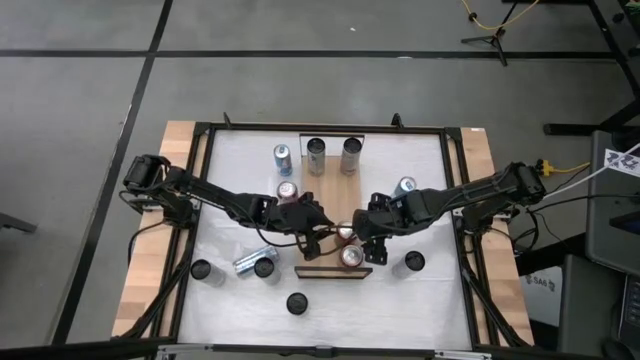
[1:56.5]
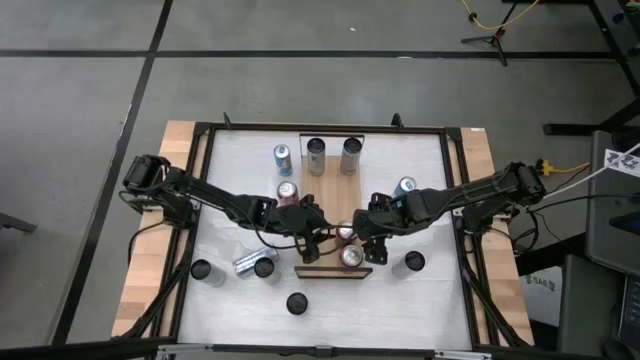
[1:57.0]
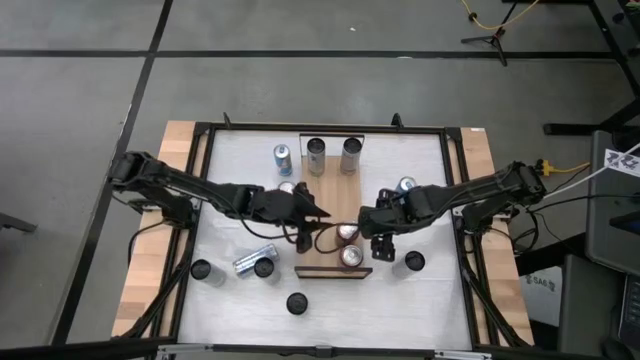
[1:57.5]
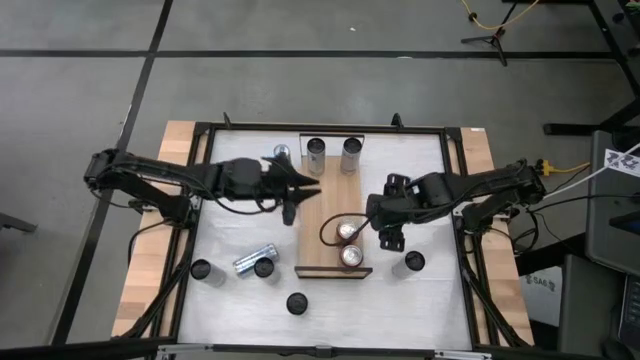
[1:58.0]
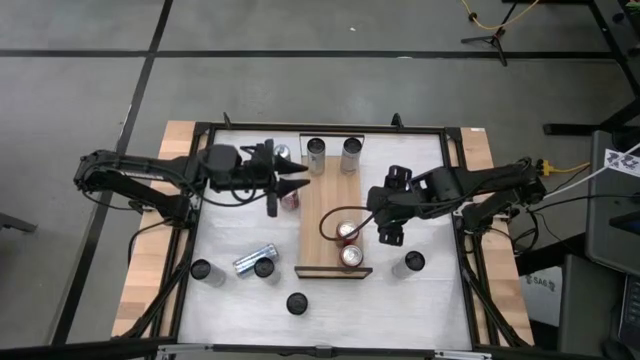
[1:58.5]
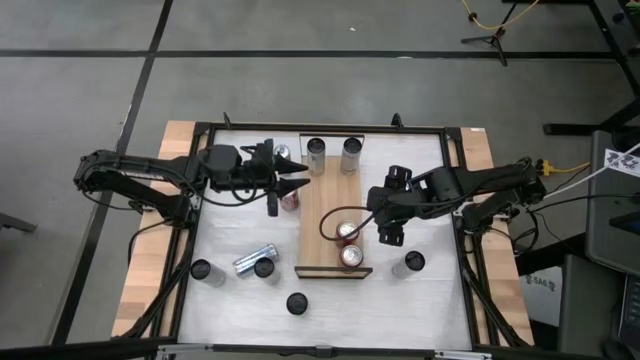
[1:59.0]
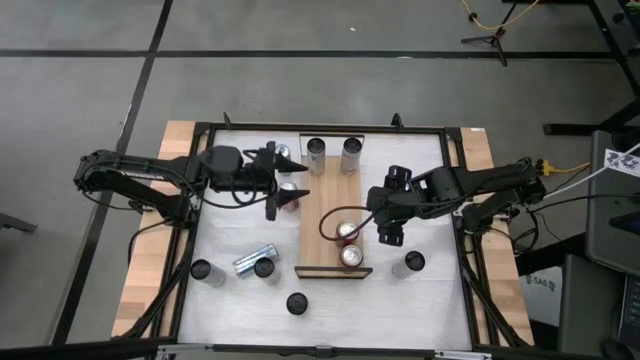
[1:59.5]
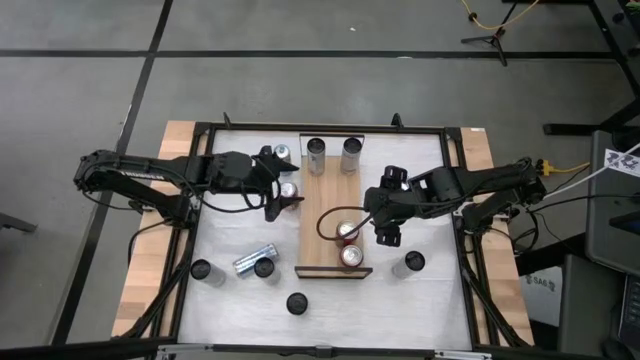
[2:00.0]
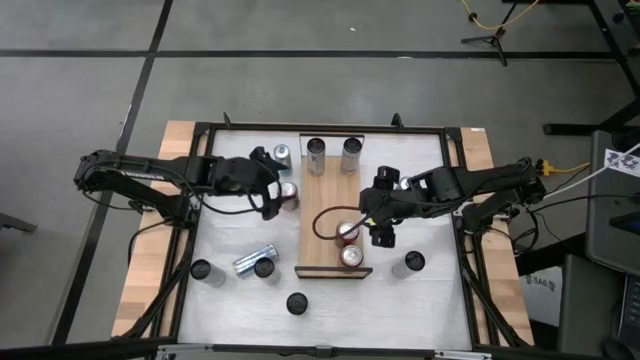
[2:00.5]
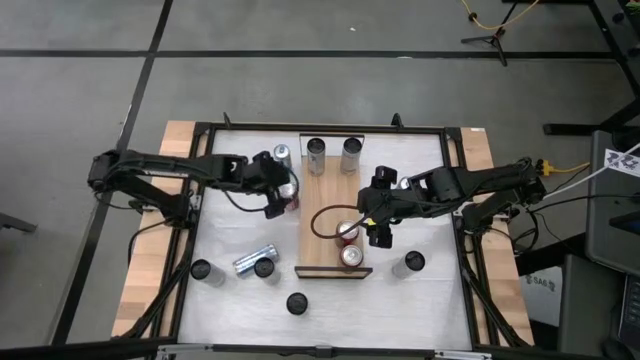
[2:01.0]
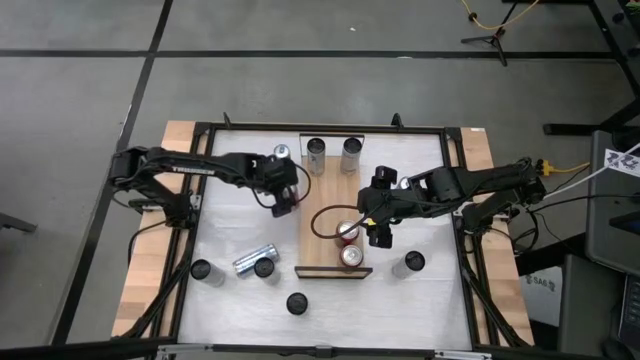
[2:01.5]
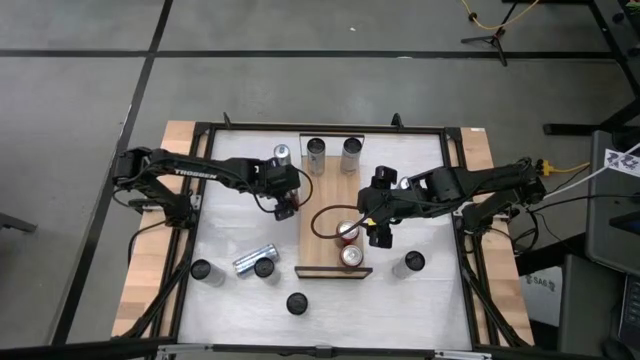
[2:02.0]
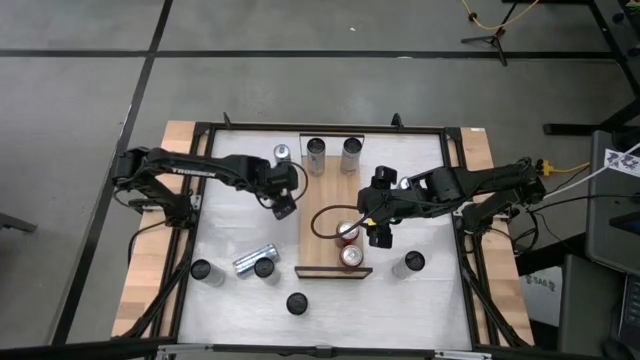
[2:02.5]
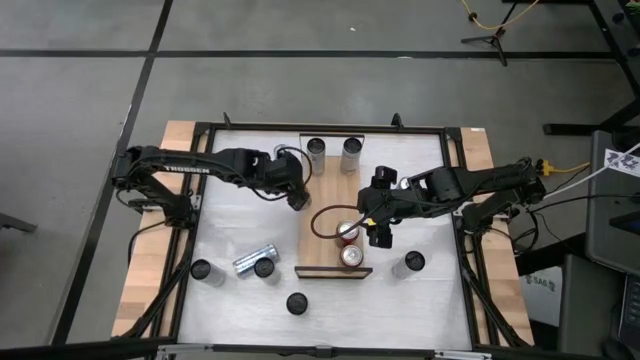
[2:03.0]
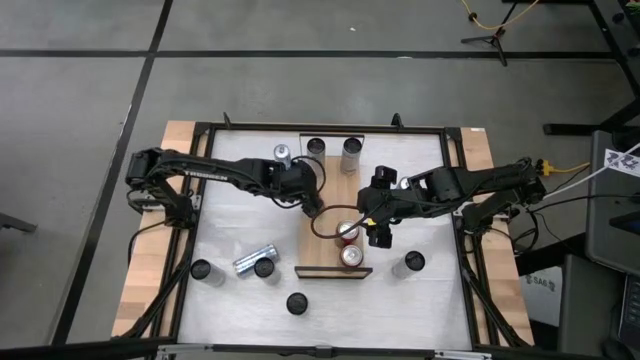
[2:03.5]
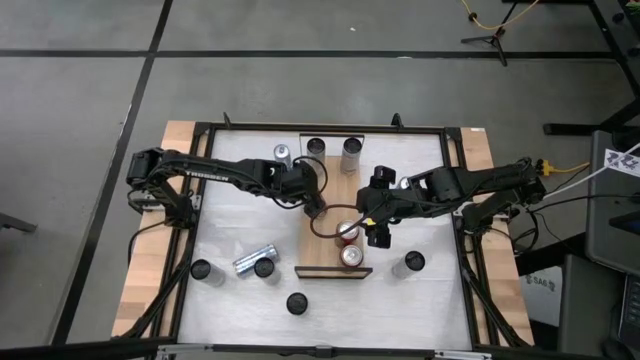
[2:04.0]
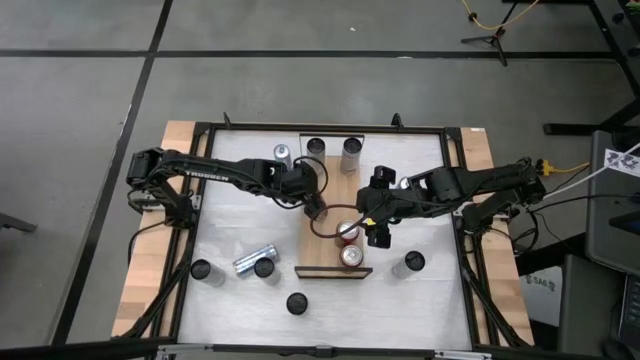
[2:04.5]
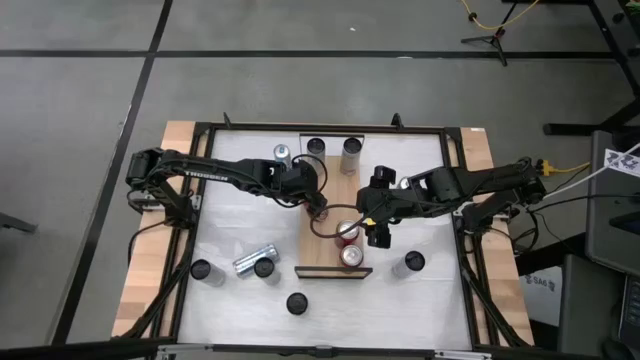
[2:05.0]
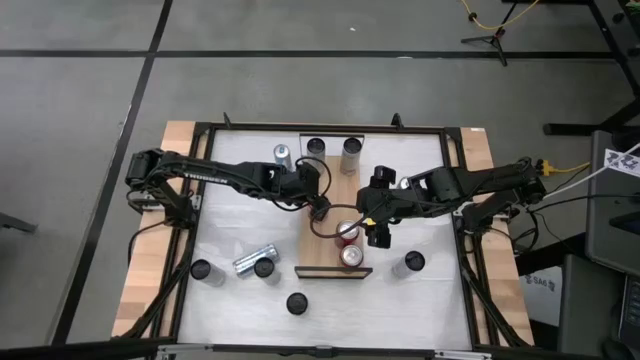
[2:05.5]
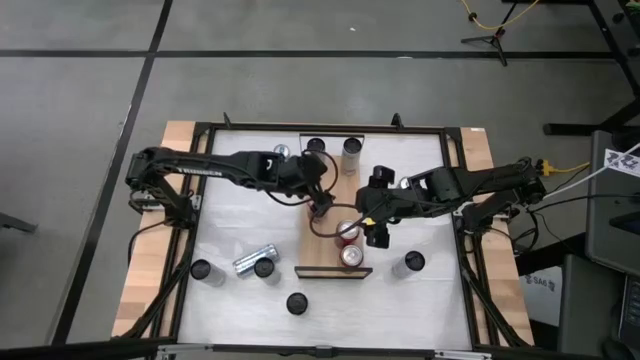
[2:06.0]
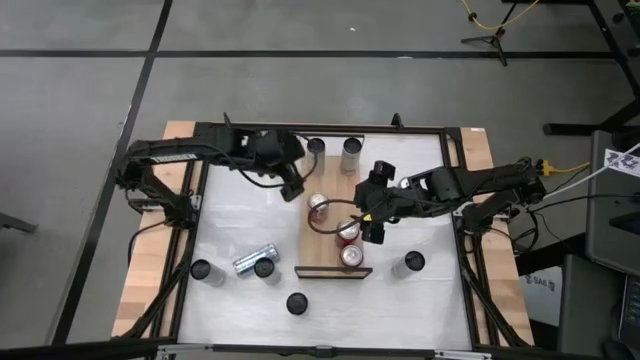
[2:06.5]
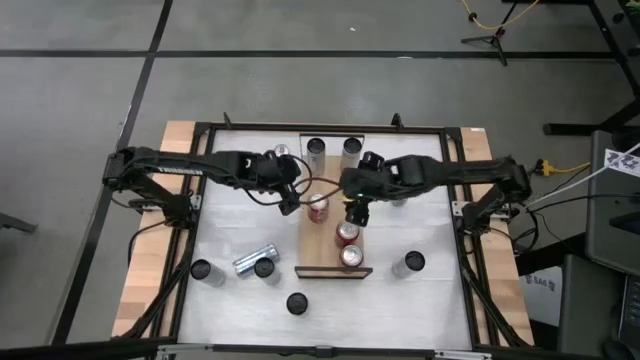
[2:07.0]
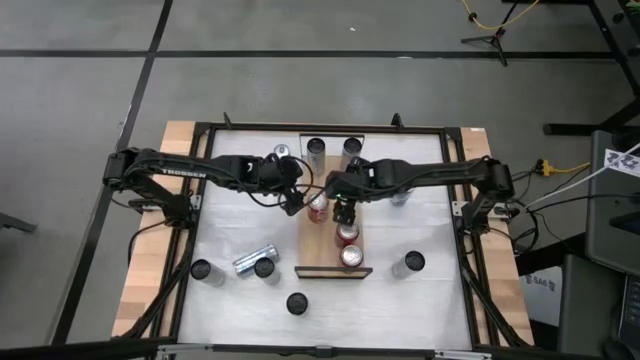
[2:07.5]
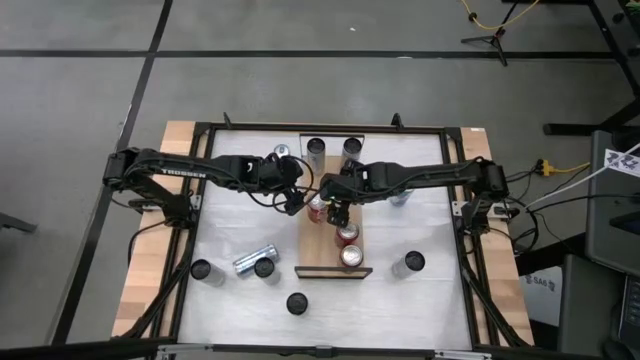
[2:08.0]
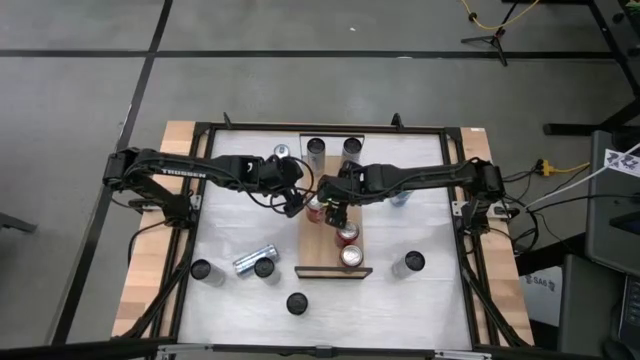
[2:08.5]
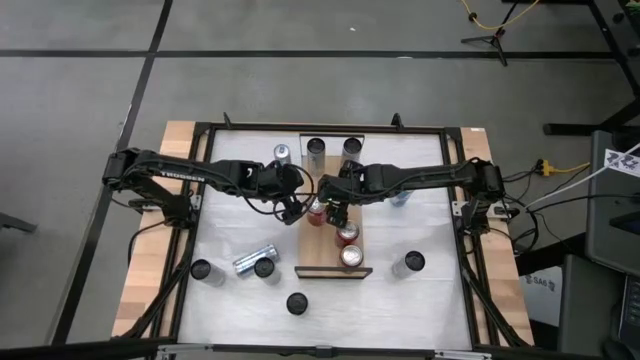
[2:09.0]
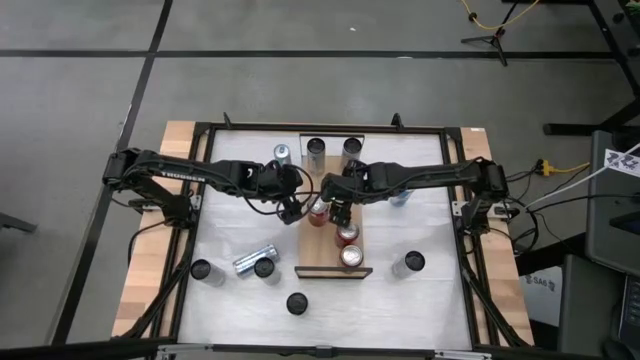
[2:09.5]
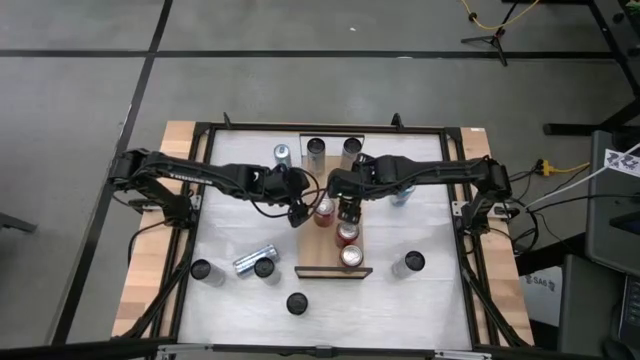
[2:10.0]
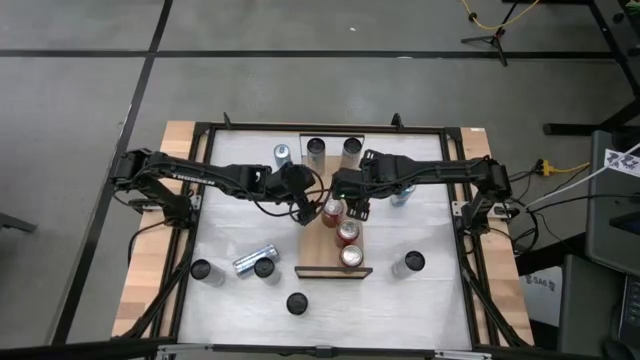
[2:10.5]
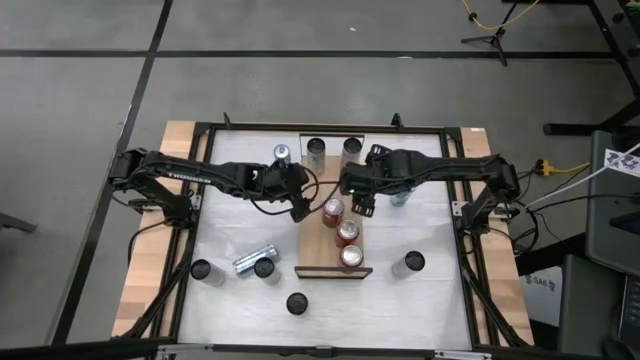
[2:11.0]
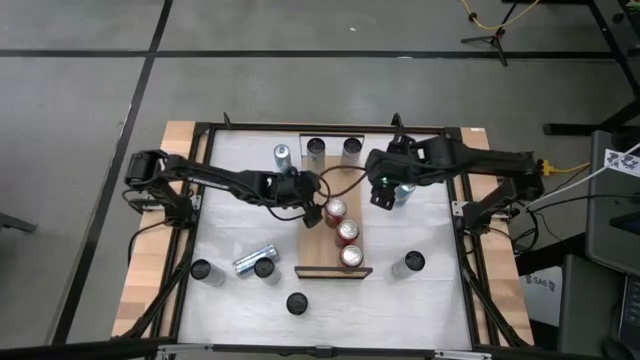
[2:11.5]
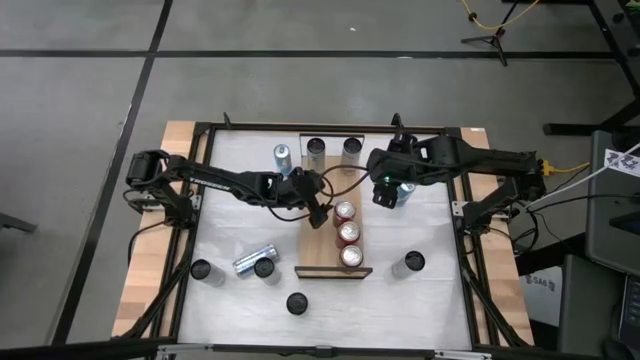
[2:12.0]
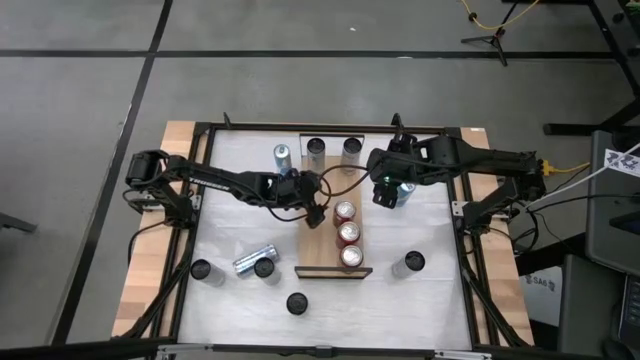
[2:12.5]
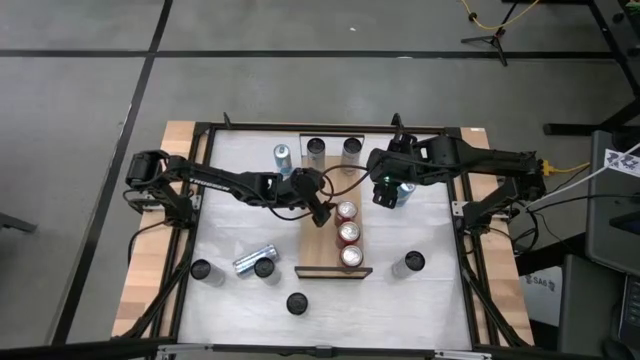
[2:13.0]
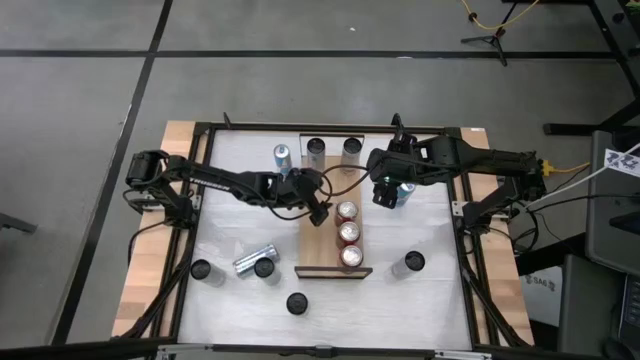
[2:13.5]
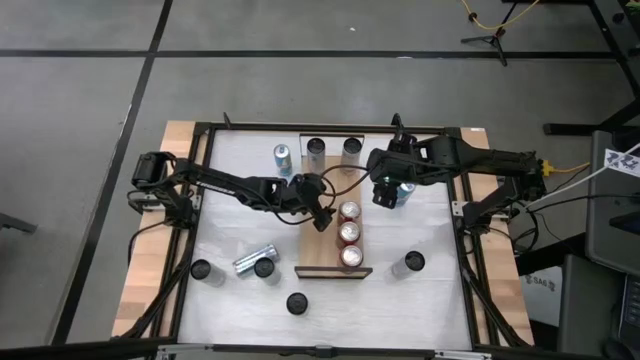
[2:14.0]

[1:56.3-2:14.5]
Task: Place canned beverage on shelf
Put the red white soda can on the shelf

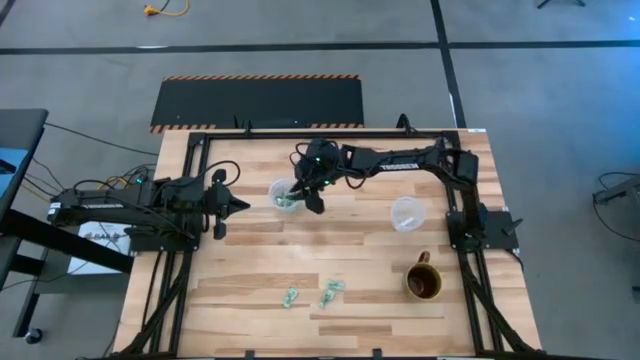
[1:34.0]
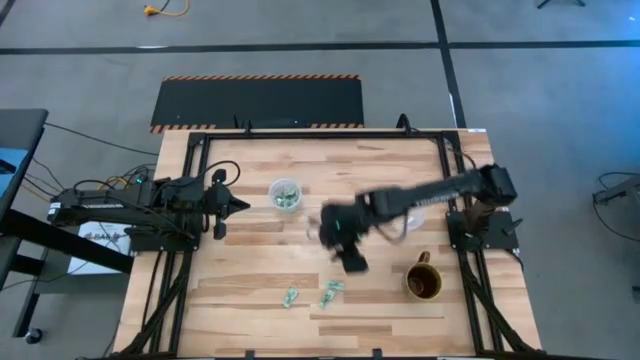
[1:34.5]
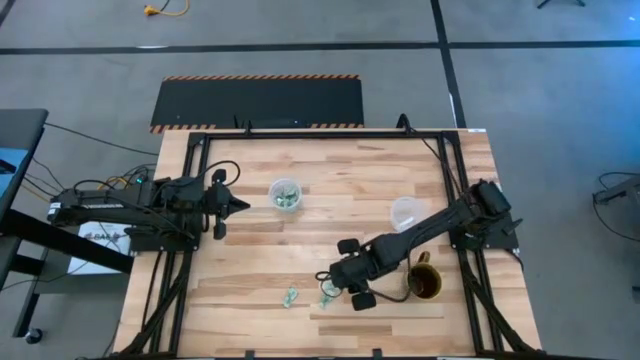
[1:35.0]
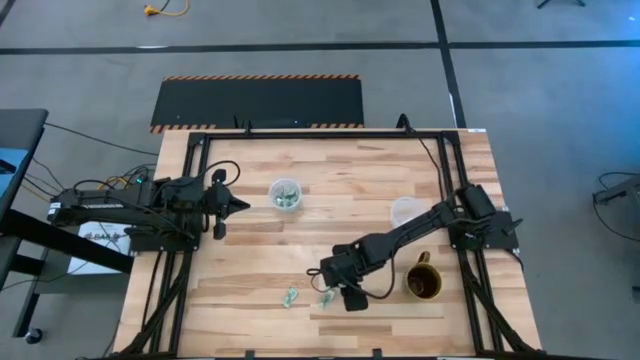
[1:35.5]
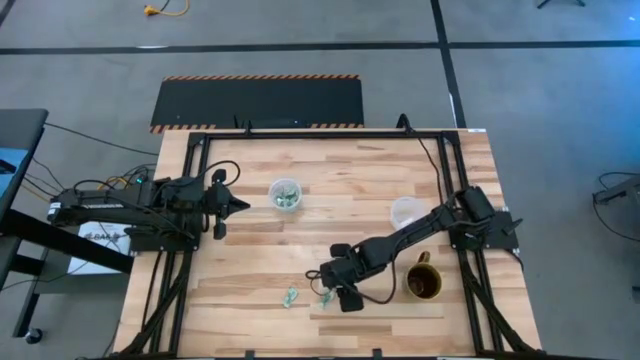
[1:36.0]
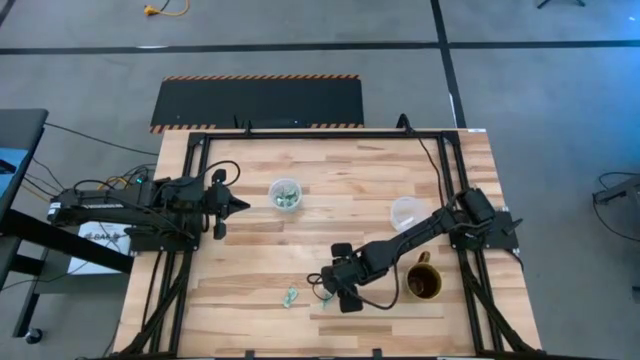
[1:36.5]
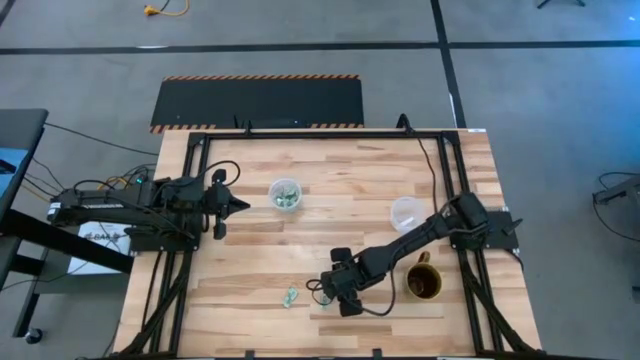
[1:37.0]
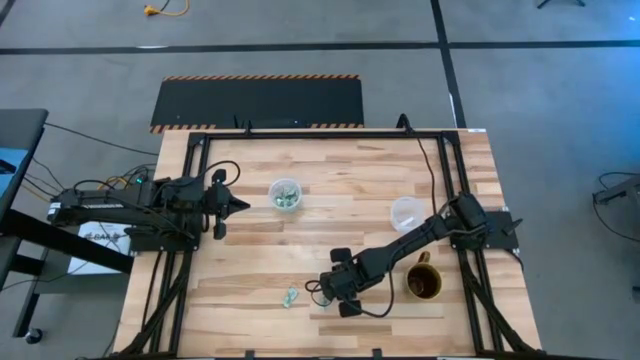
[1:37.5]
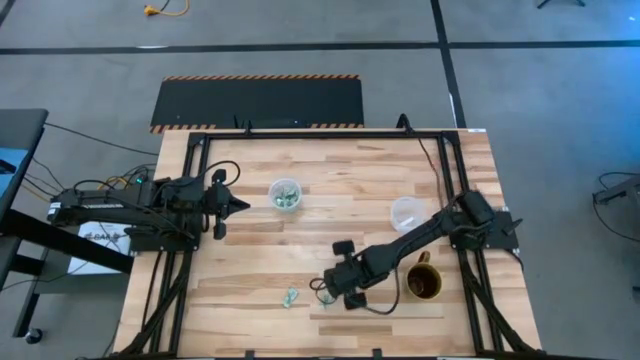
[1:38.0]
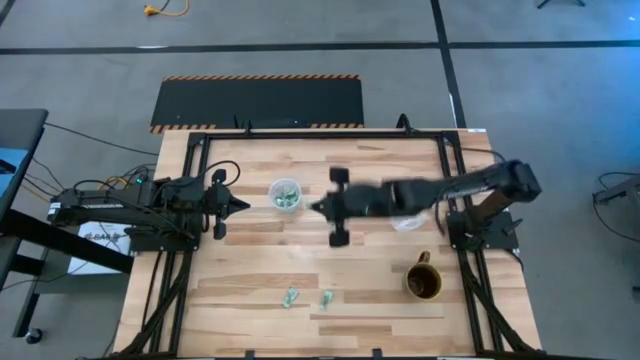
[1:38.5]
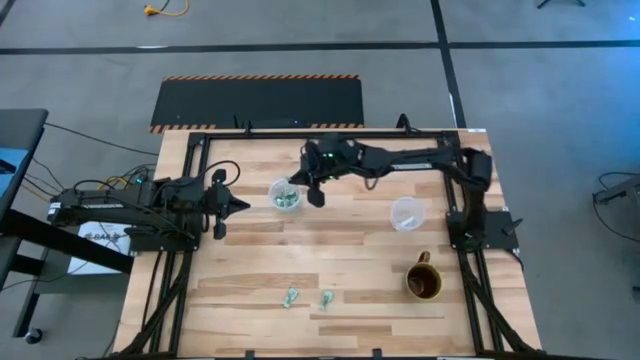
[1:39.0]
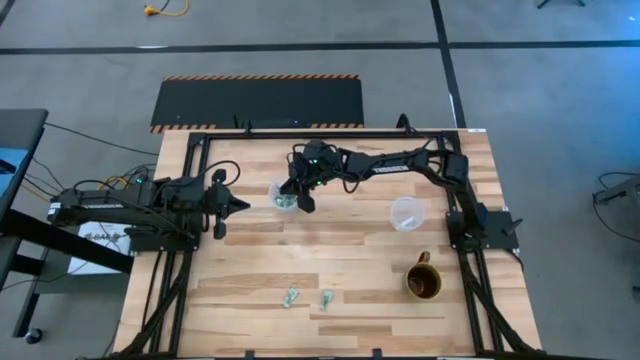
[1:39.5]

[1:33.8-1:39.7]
Task: Pick and place Stevia / Truvia into bins
Put the white stevia packet into the left transparent container
